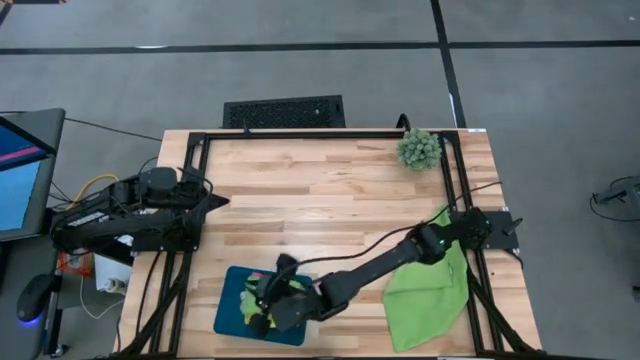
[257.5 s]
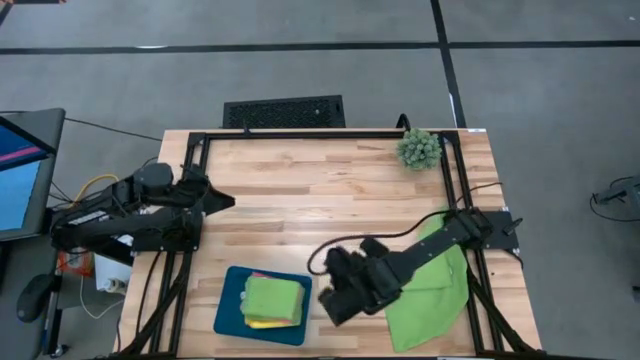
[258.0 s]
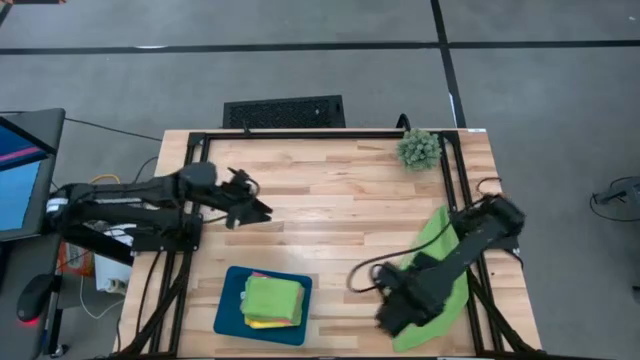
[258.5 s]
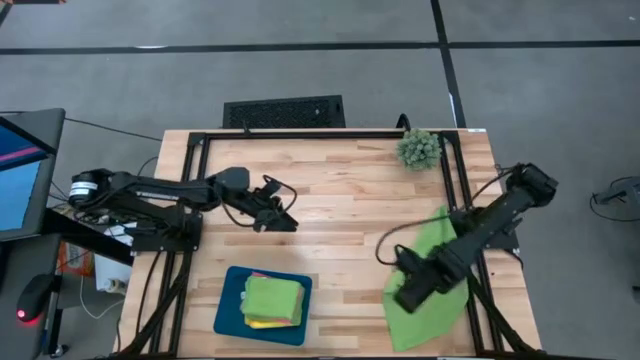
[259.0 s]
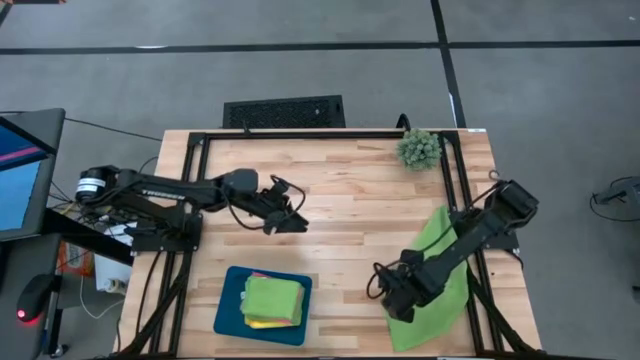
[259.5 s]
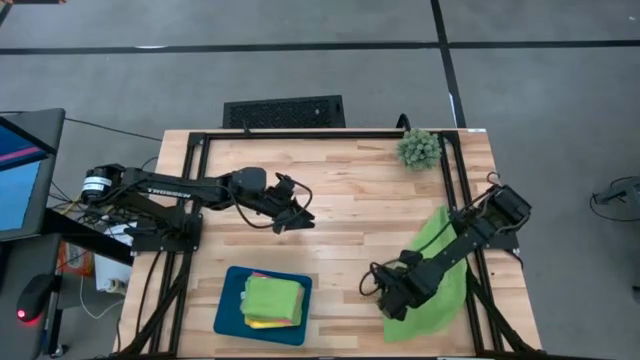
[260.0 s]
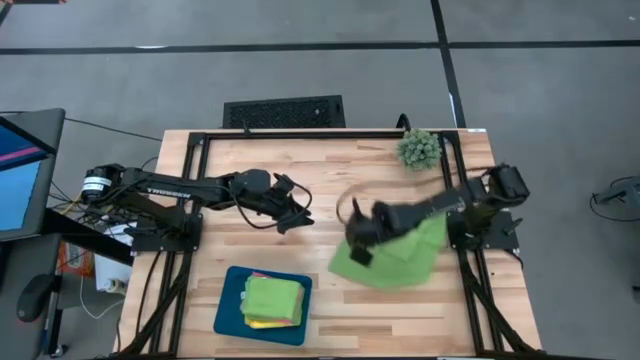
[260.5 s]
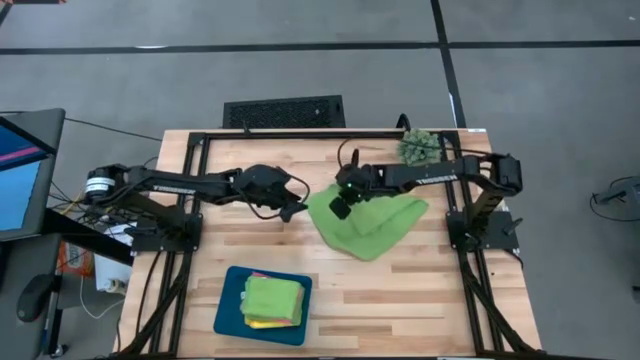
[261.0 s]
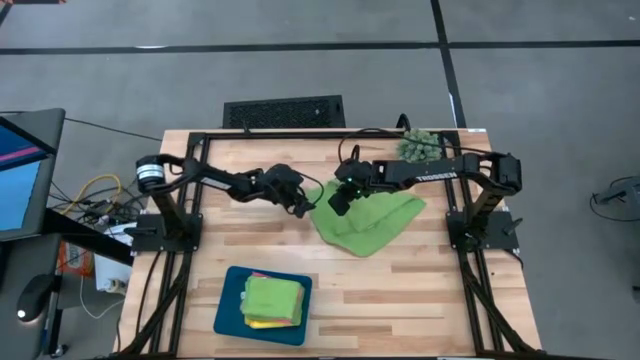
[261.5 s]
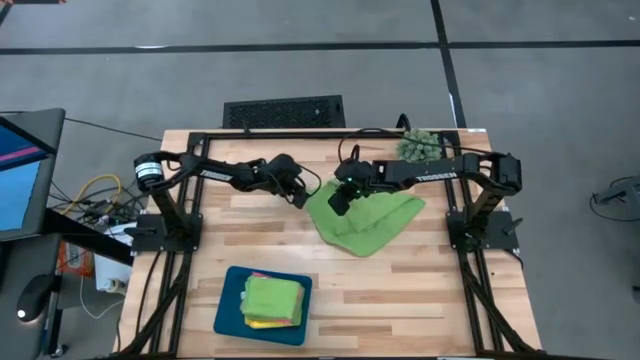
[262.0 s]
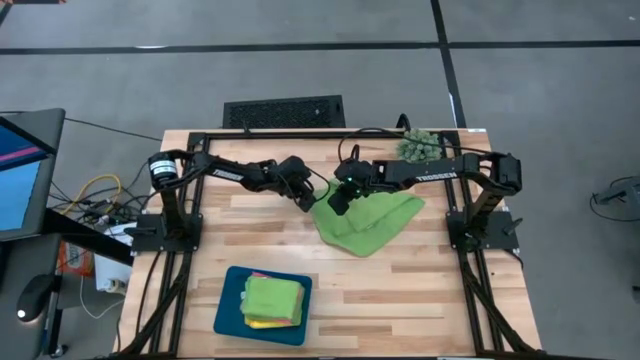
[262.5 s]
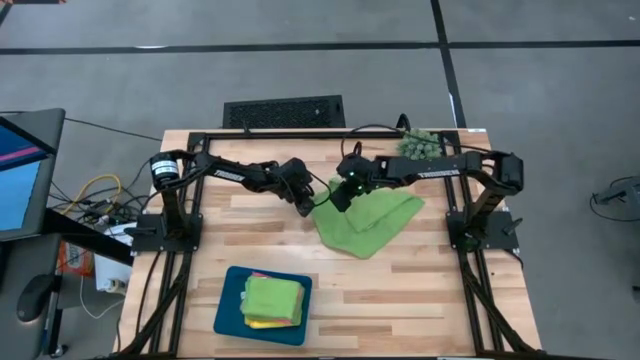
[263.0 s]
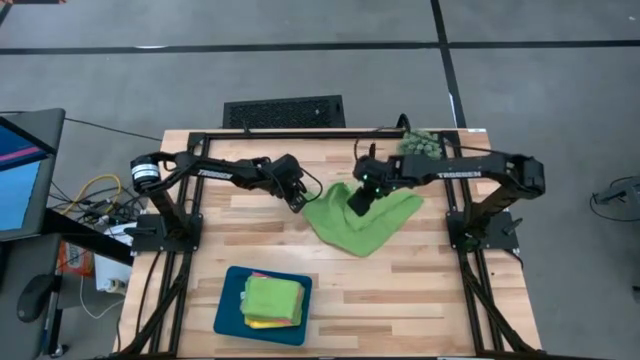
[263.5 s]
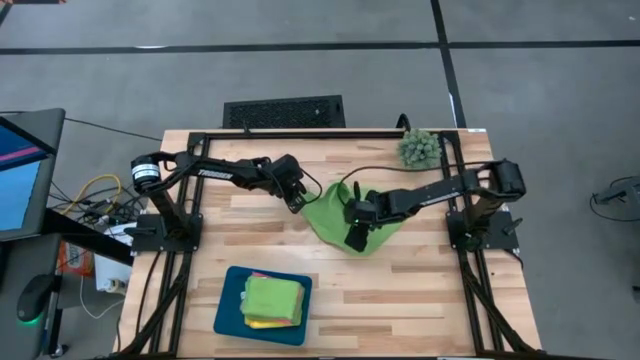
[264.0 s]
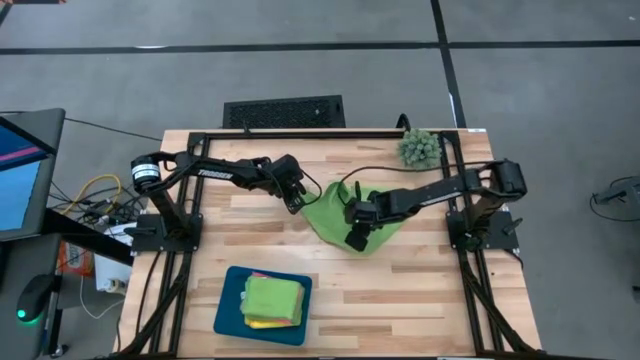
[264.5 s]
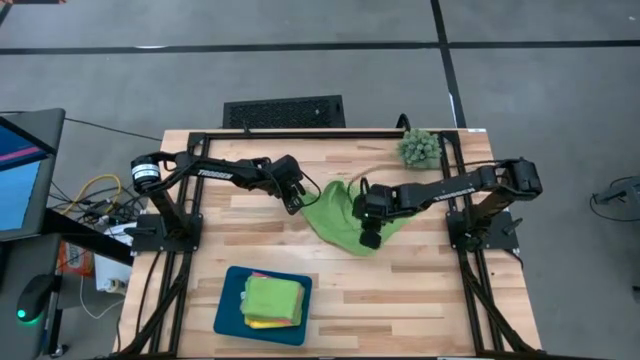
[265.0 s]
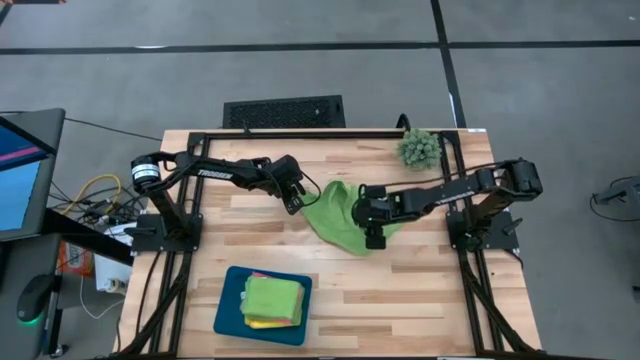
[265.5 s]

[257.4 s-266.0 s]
Task: Fold microfiber towels
Fold the green microfiber towel

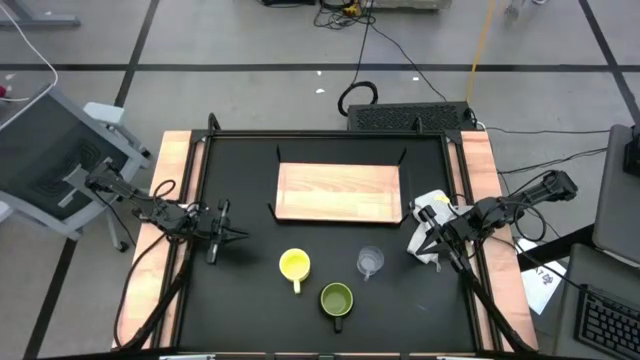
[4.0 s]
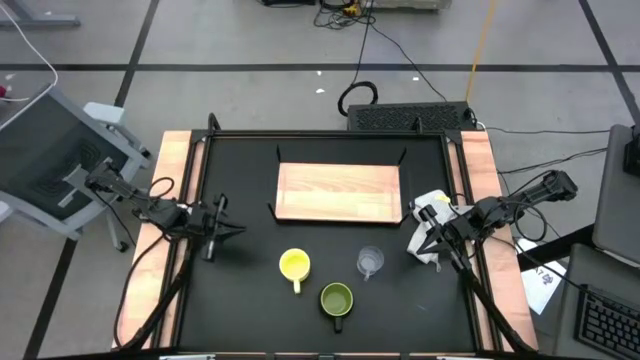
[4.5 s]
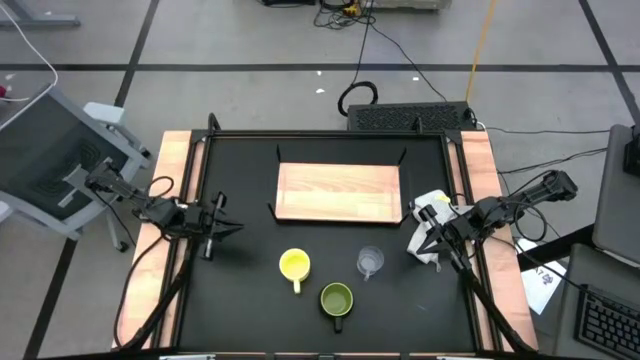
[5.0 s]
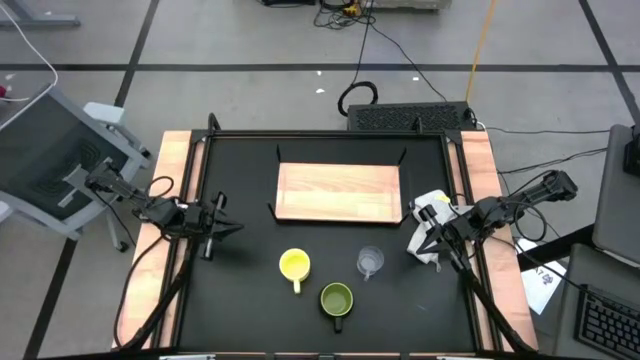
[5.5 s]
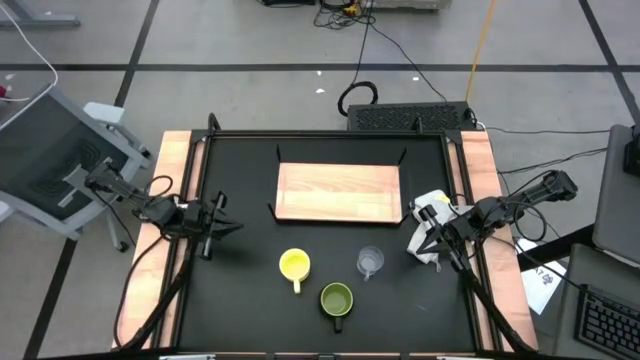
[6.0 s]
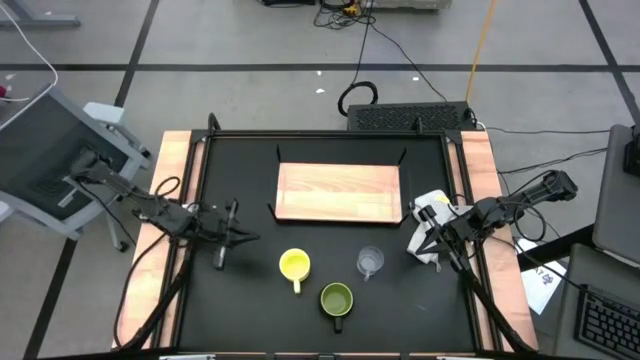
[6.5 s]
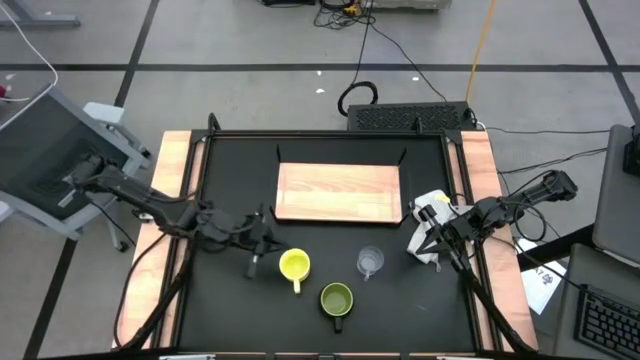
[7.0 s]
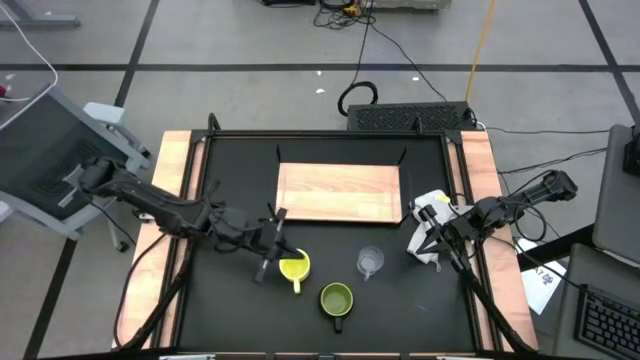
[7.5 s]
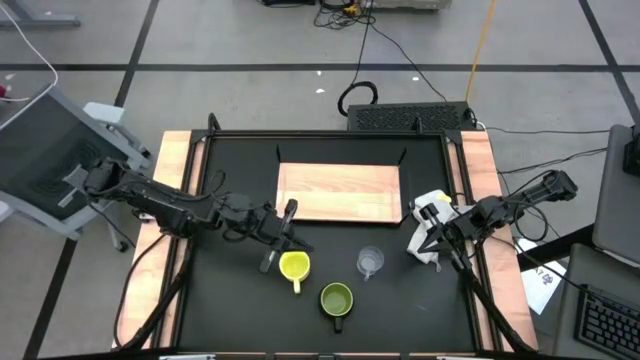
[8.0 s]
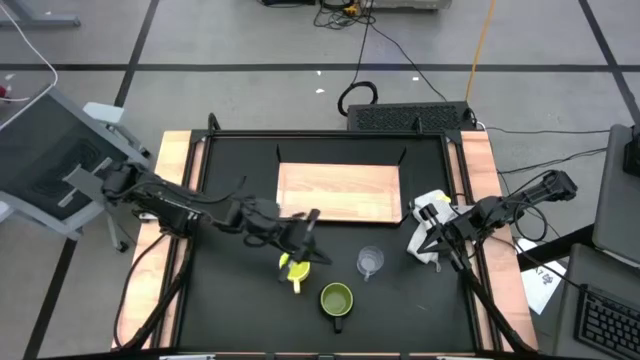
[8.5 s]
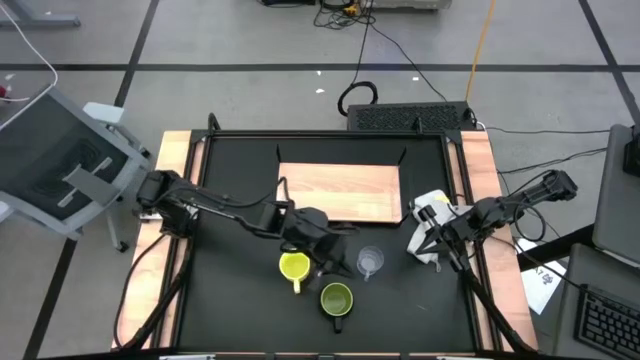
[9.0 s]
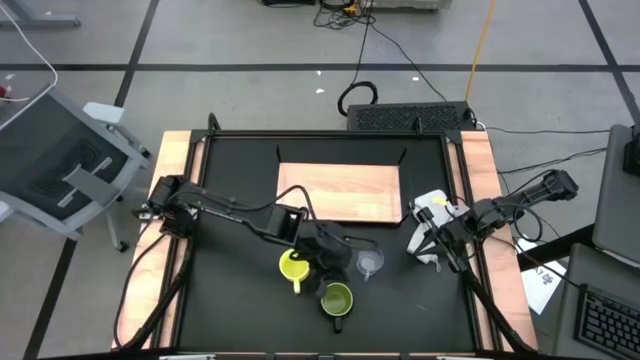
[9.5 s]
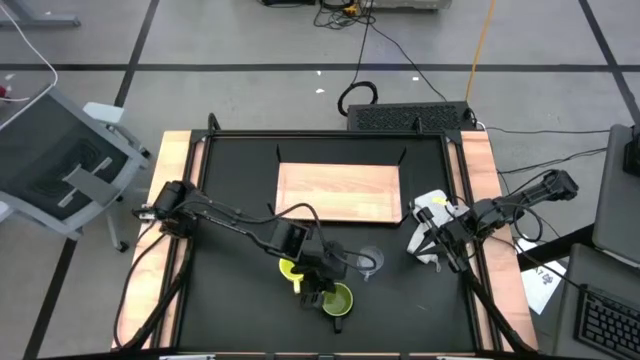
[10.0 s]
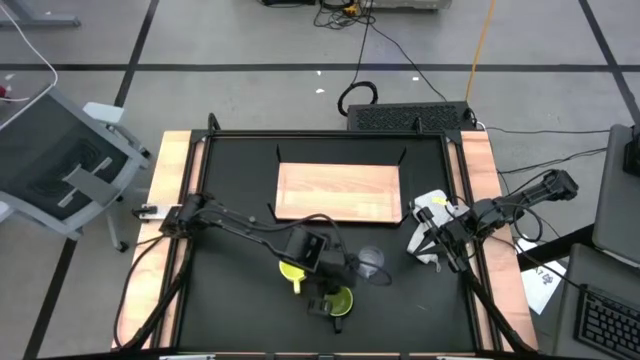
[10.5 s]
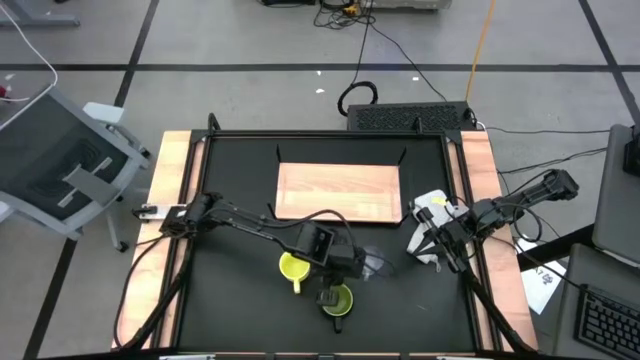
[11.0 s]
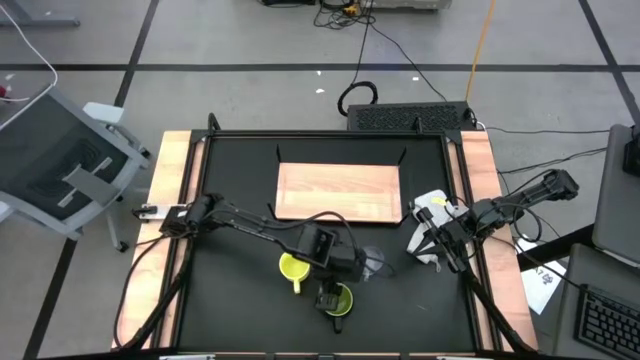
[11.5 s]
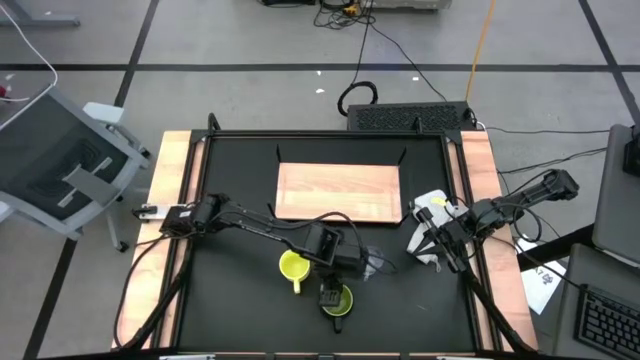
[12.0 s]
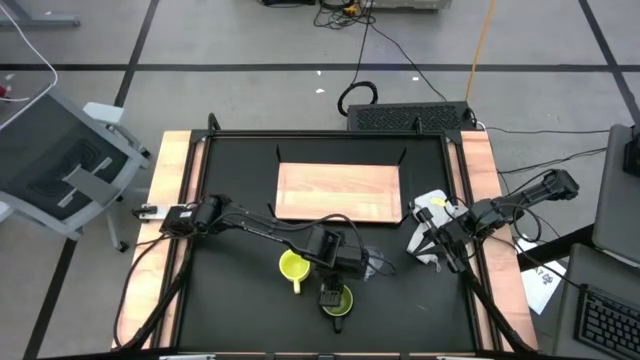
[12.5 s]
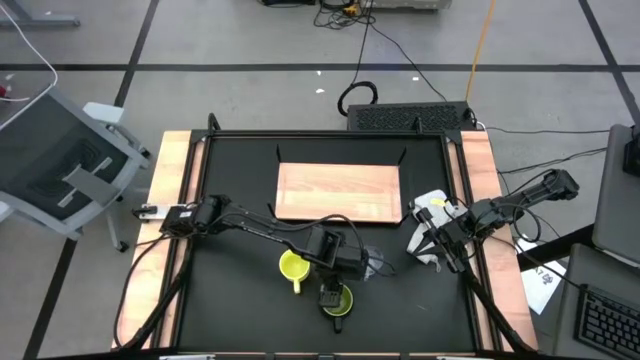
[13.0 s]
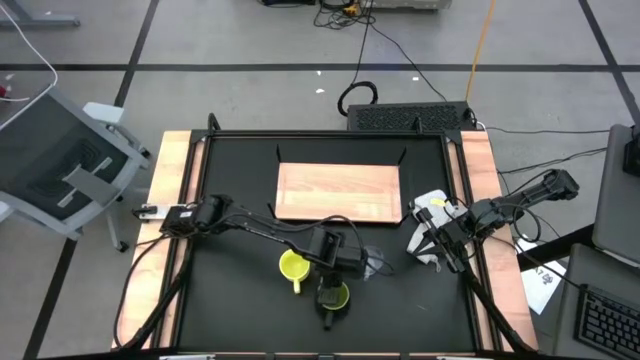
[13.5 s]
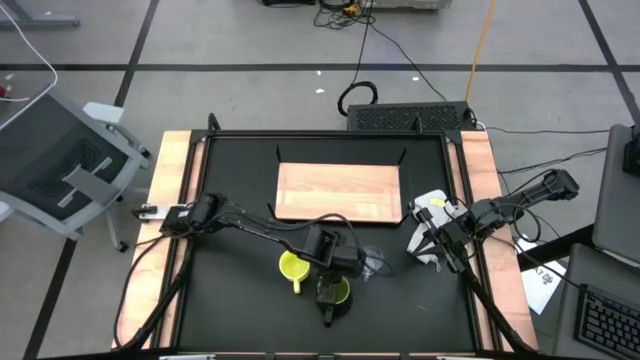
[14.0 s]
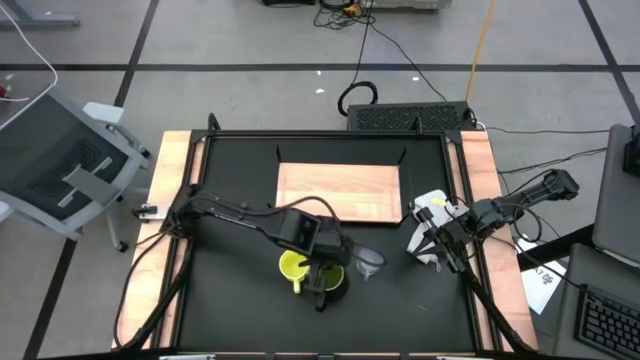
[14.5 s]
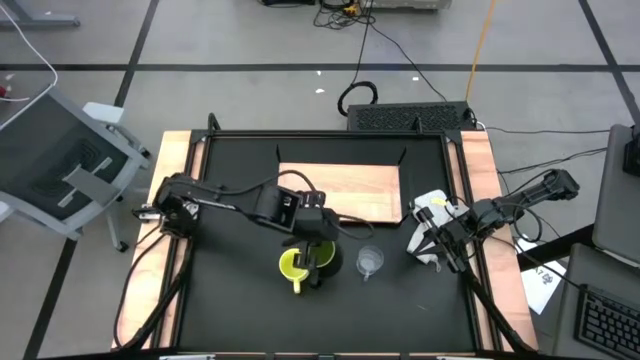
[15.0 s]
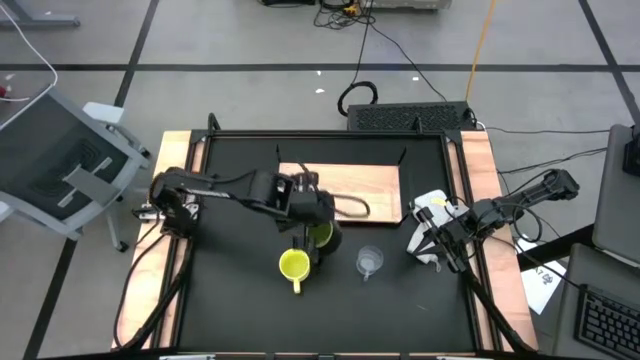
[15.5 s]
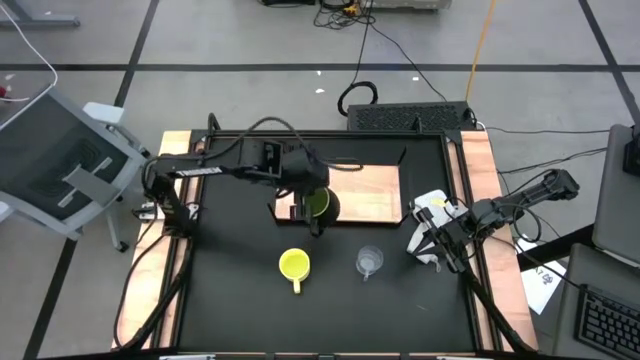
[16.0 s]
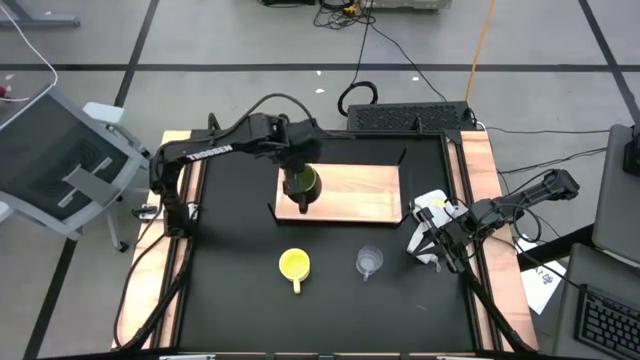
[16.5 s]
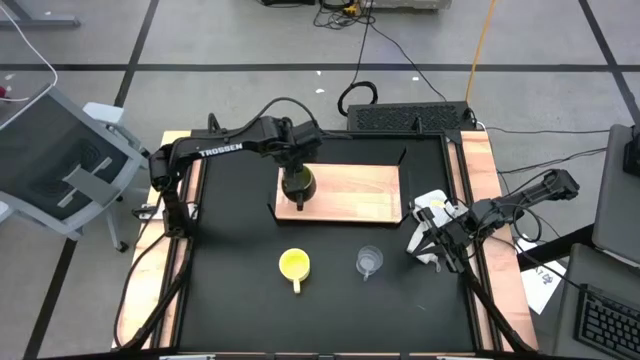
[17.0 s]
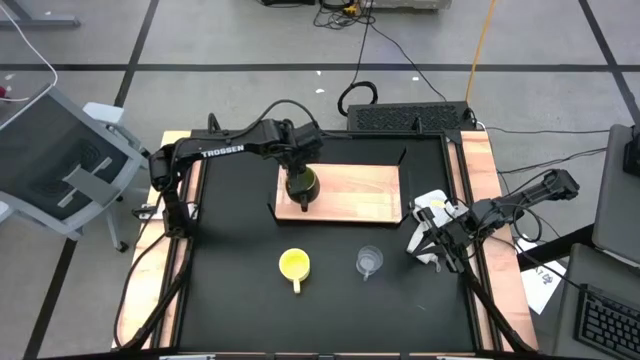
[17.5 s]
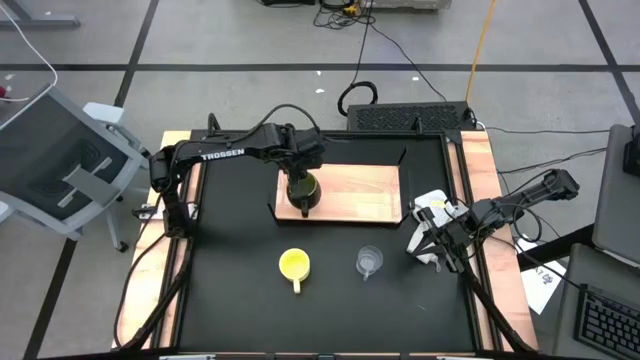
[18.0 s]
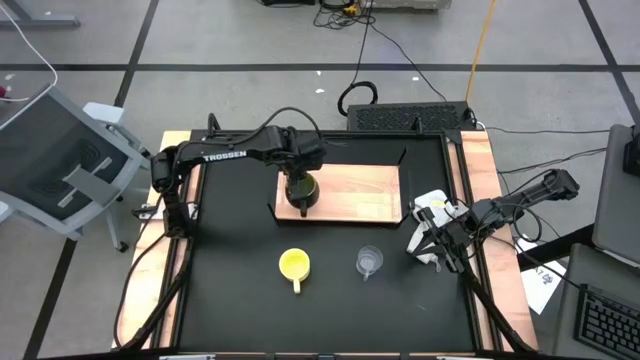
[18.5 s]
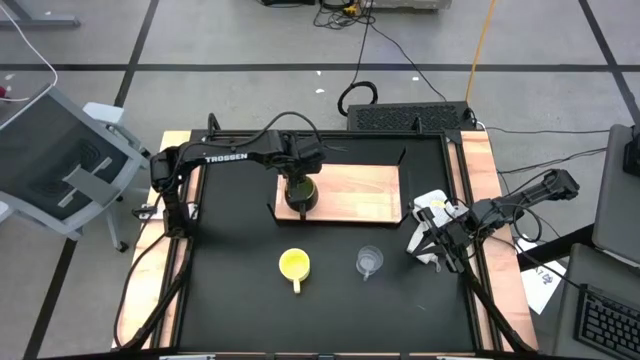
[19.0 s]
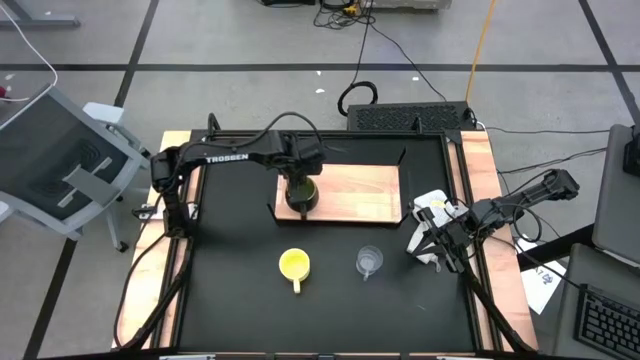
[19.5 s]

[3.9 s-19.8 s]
Task: Stack small to large cups/mugs on shelf
Put the black mug on the shelf
